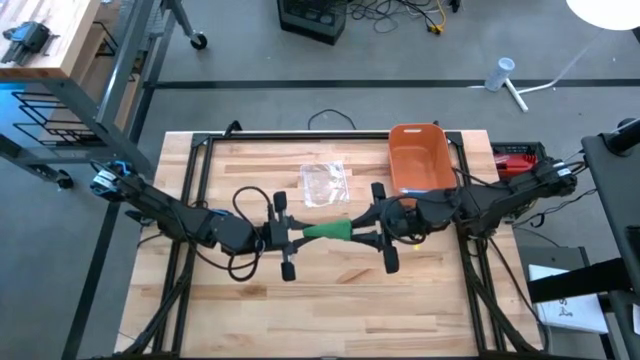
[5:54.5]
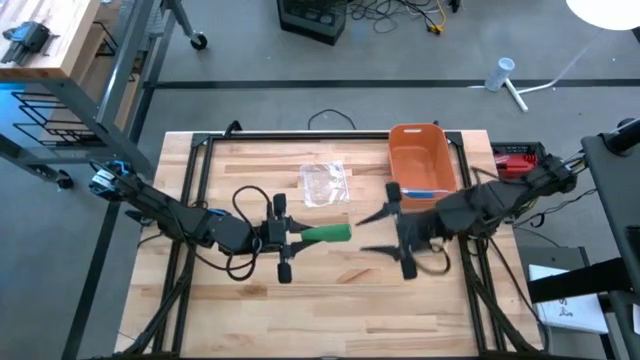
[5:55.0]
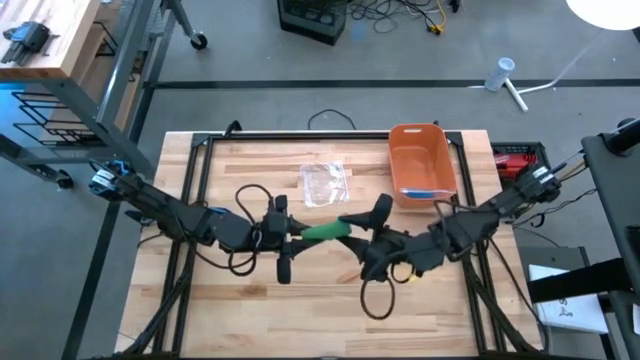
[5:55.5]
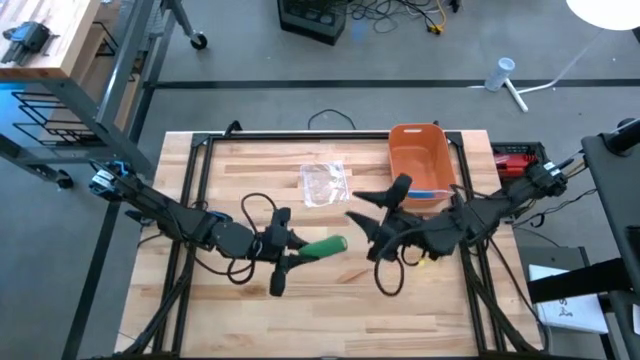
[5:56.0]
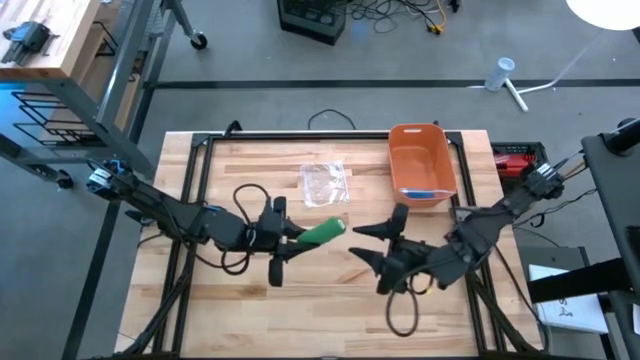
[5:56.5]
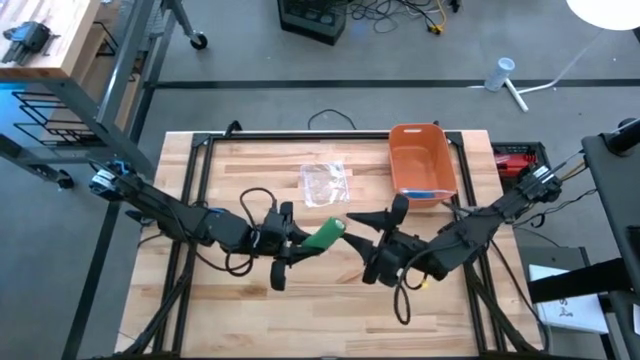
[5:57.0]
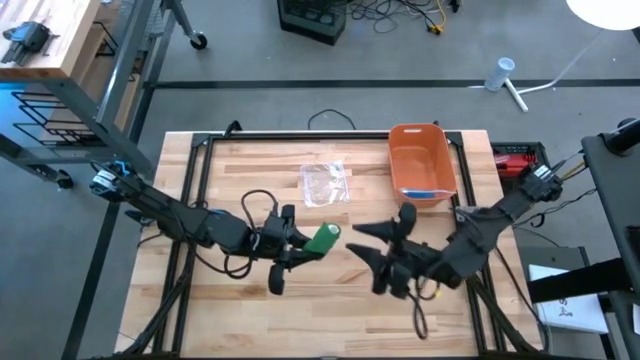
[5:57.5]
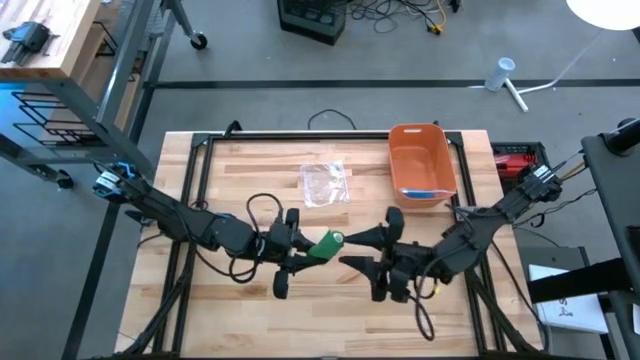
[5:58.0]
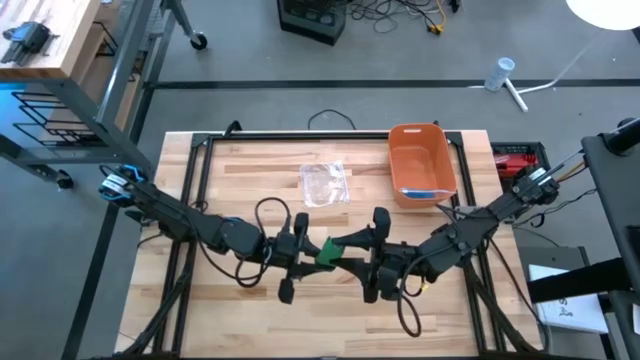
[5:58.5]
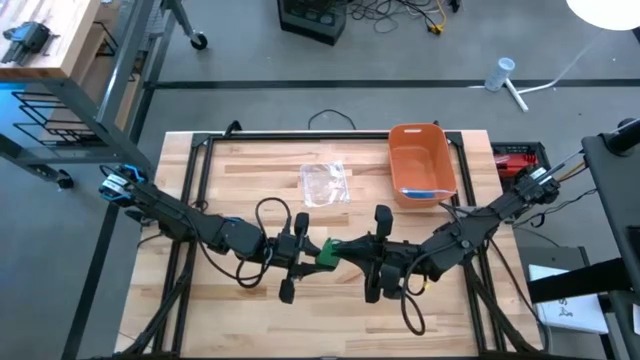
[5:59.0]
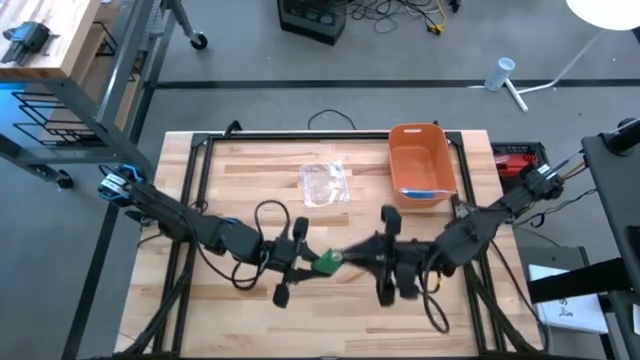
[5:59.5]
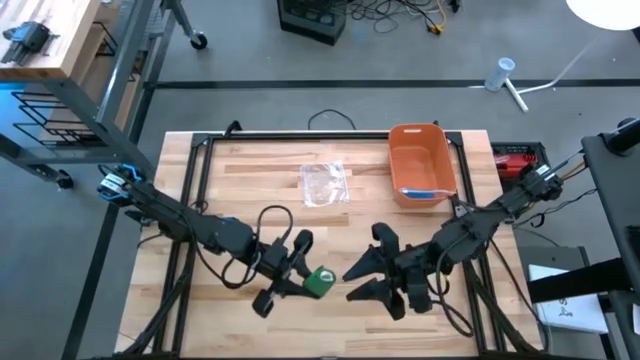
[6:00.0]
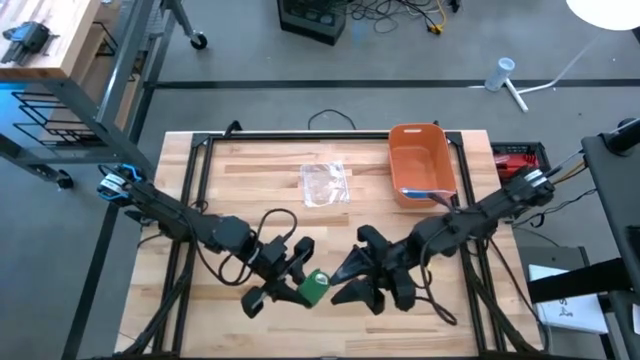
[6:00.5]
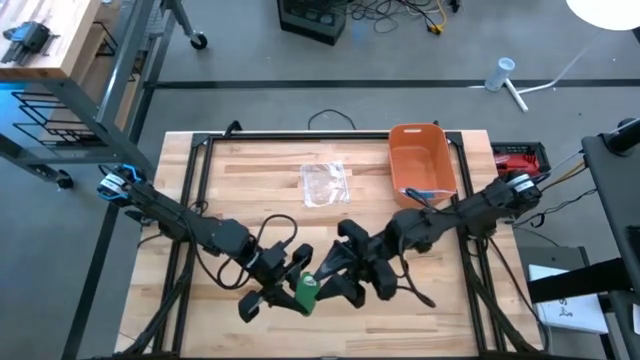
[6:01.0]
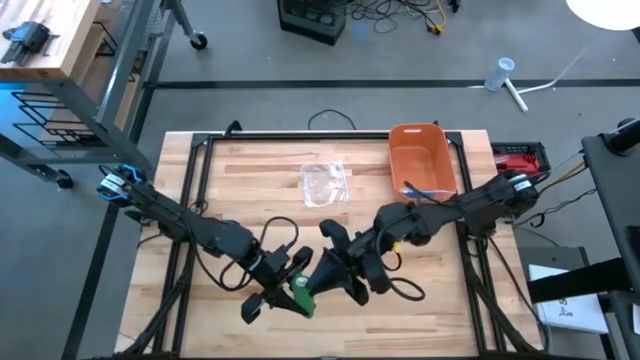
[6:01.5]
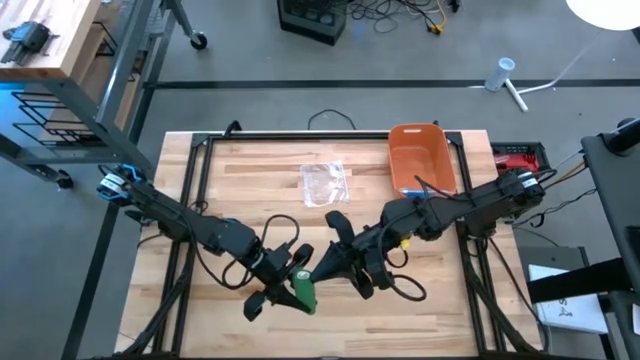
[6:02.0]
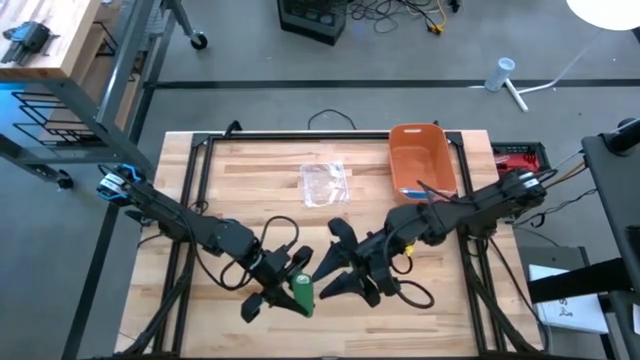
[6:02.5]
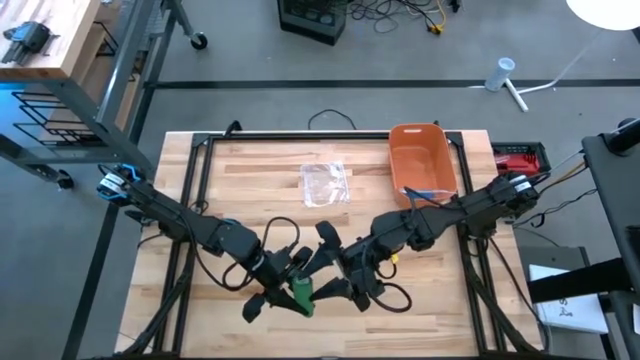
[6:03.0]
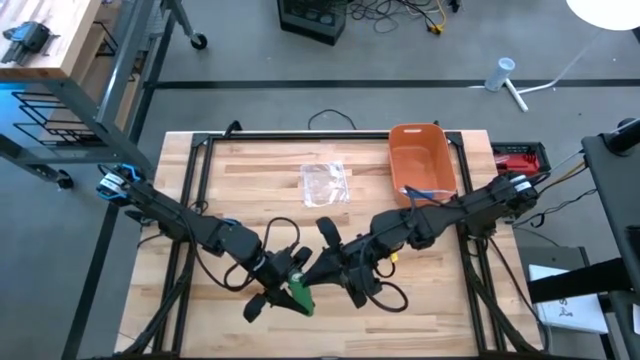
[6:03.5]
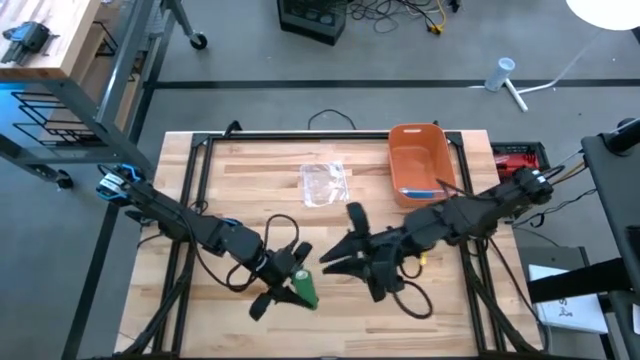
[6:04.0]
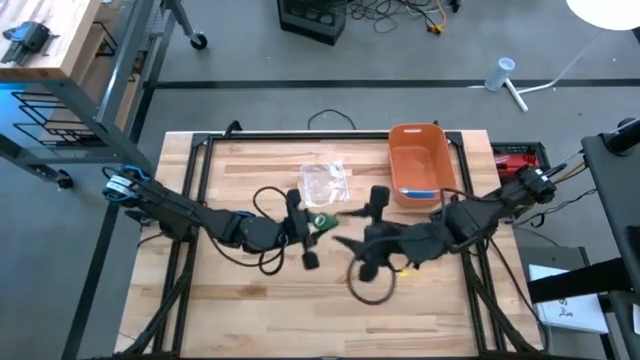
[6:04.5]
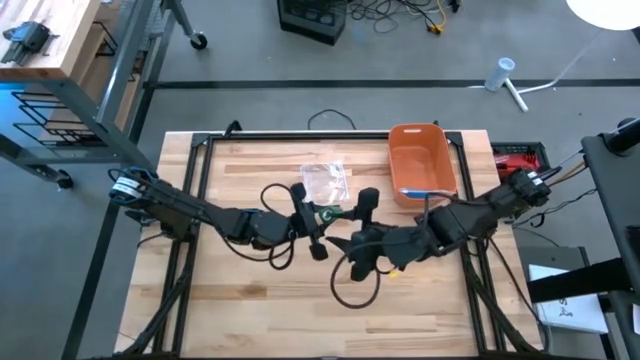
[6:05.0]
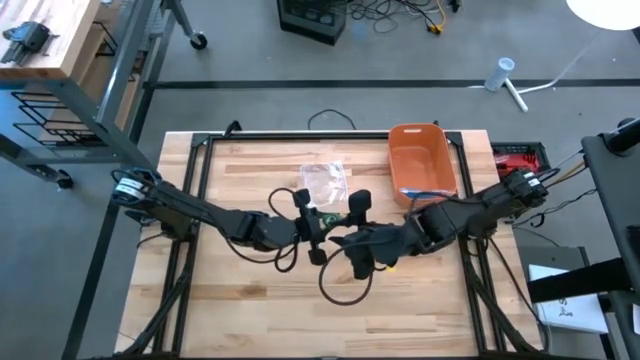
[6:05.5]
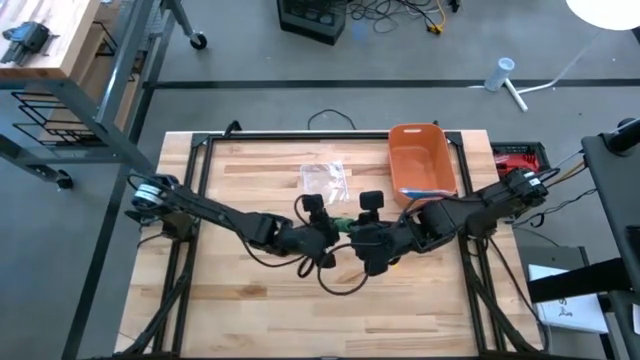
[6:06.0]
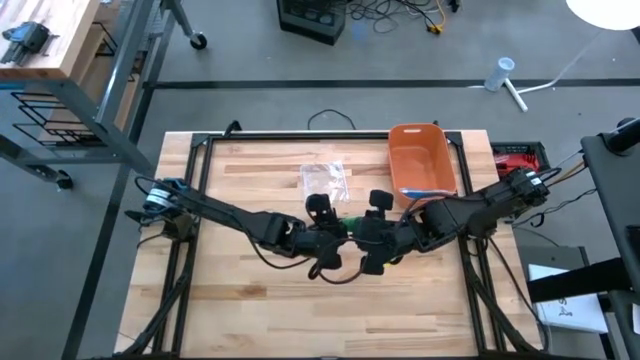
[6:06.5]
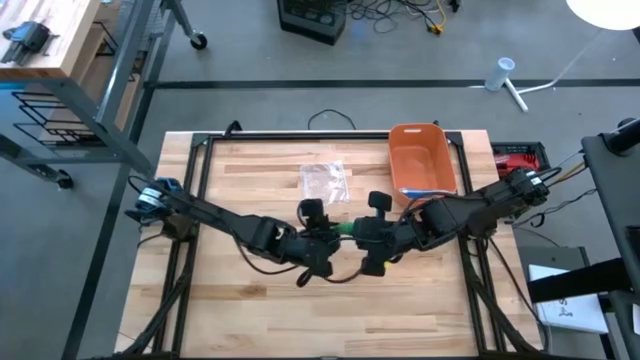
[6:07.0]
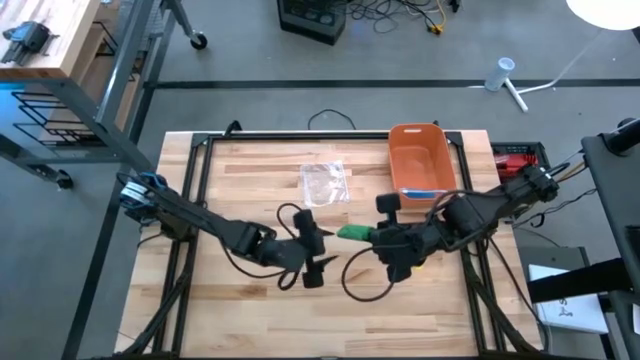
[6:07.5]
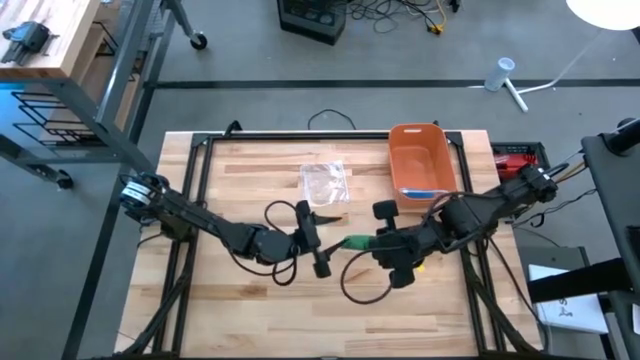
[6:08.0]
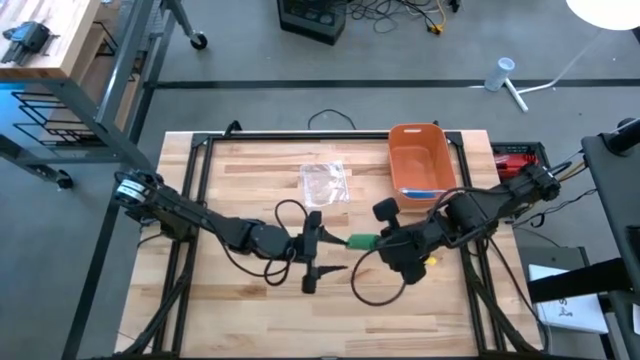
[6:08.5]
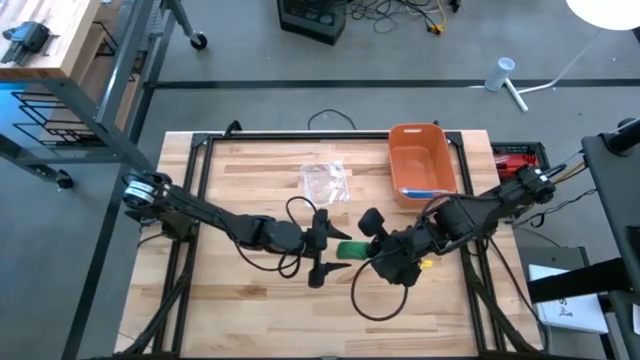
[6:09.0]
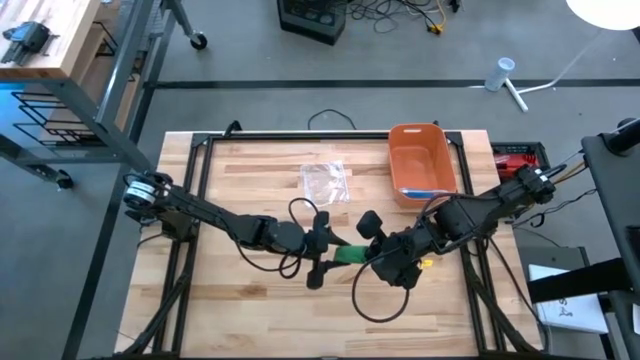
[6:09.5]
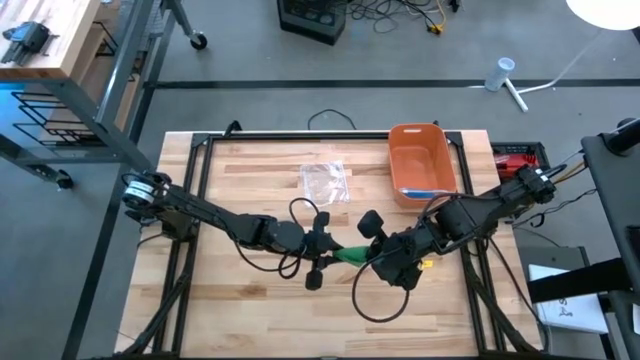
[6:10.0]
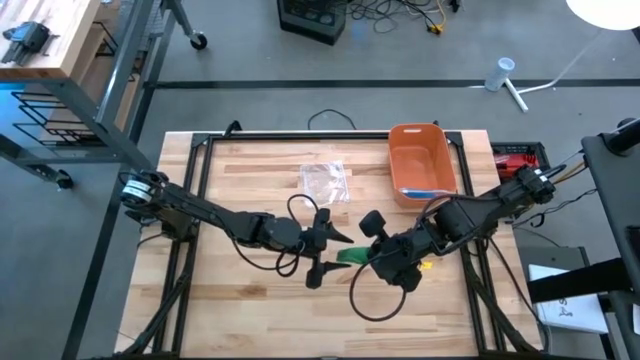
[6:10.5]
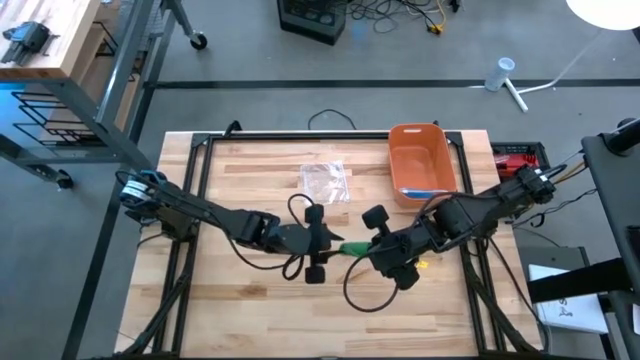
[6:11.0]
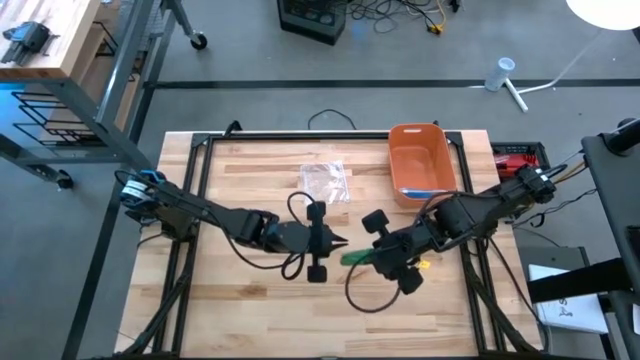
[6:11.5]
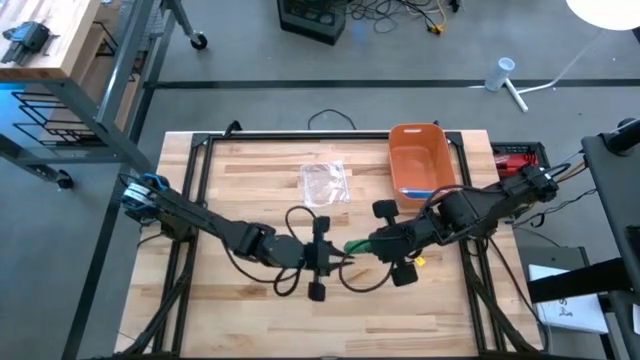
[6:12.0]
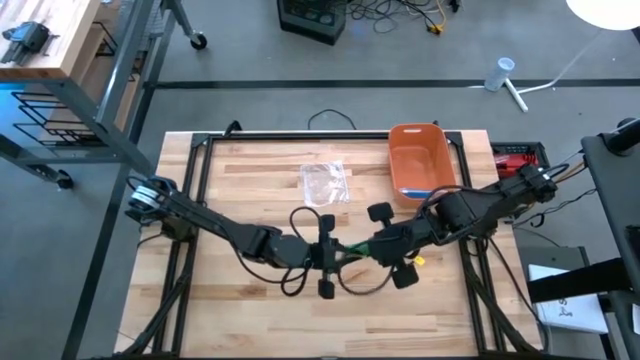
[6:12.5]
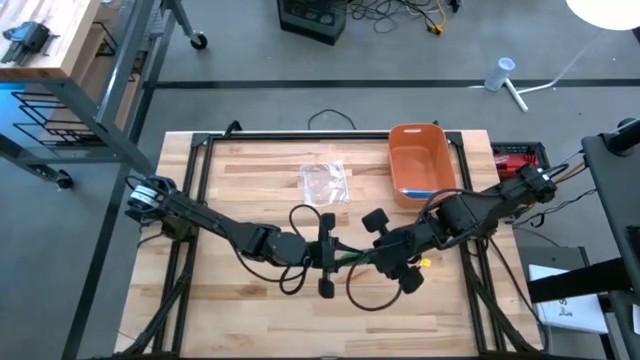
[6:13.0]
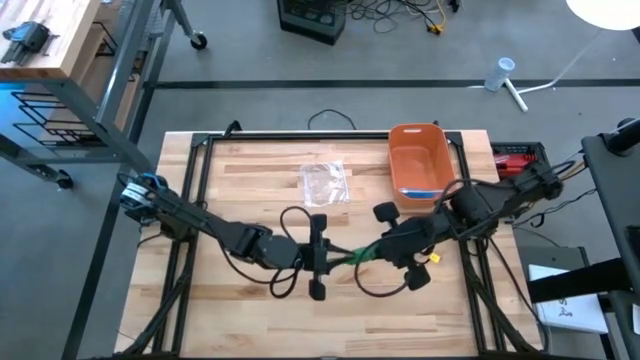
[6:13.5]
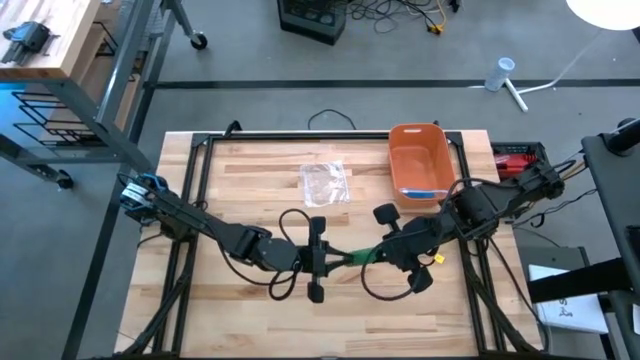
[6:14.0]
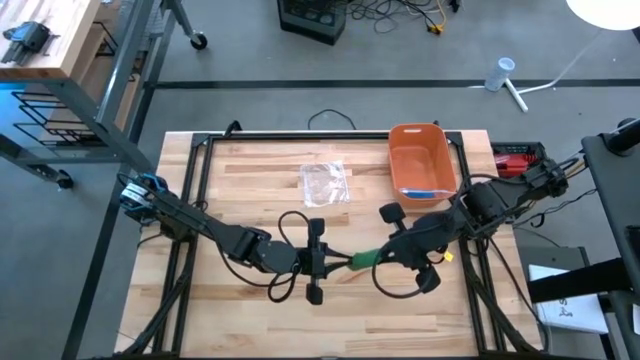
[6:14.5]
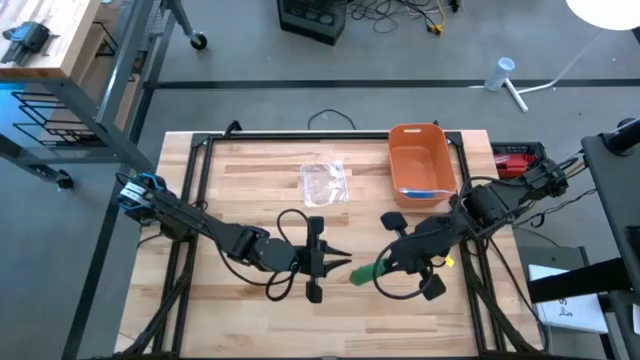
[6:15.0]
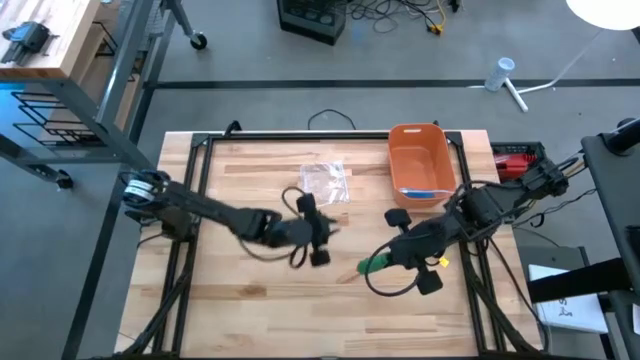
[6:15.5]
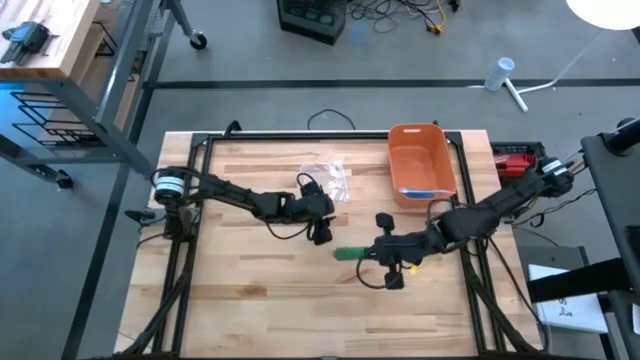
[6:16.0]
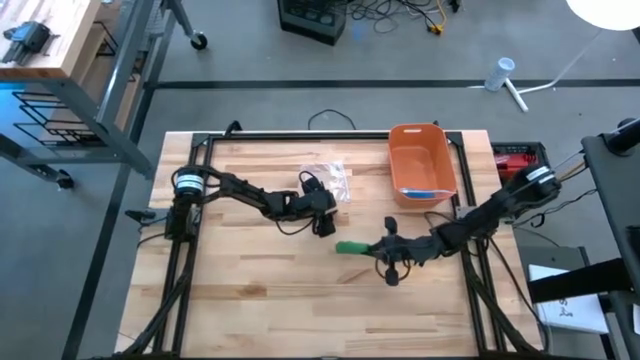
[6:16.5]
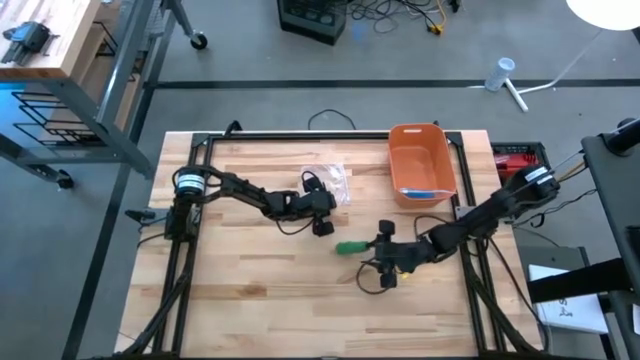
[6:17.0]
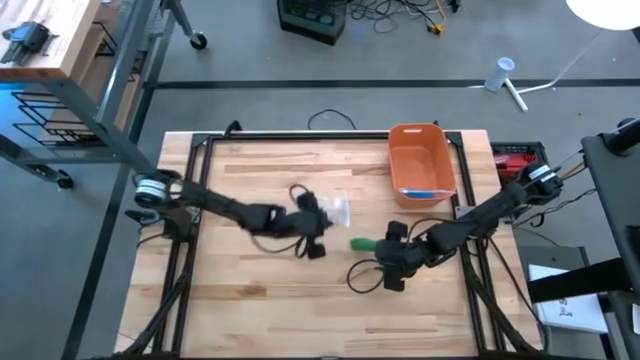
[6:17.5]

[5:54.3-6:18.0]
Task: Roll bandage
Roll the green bandage
